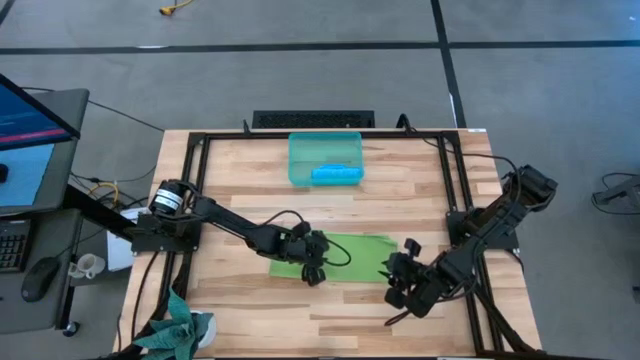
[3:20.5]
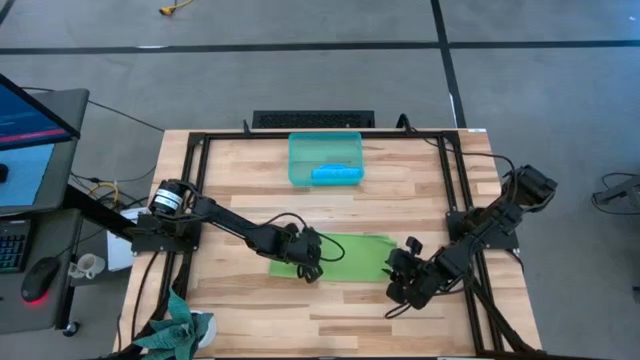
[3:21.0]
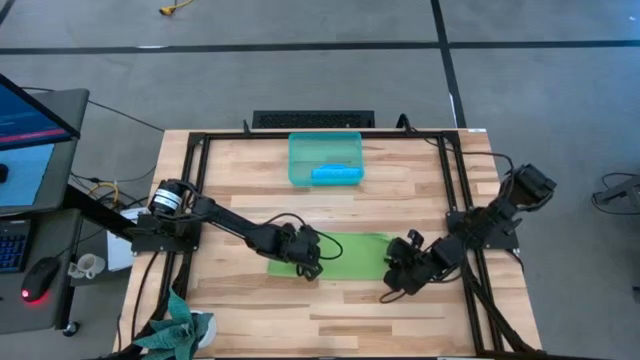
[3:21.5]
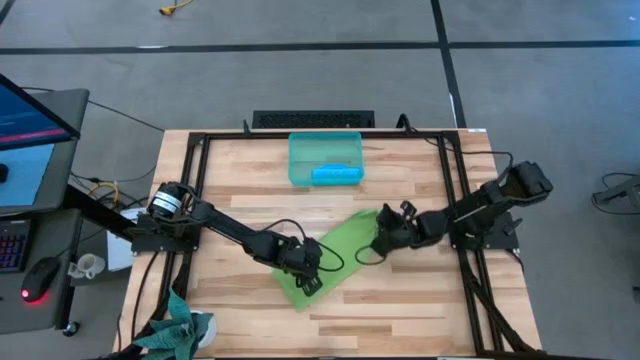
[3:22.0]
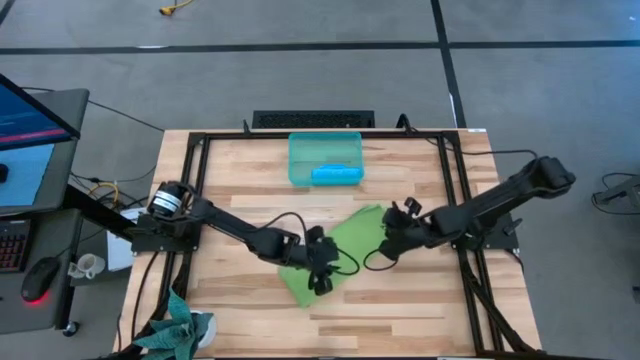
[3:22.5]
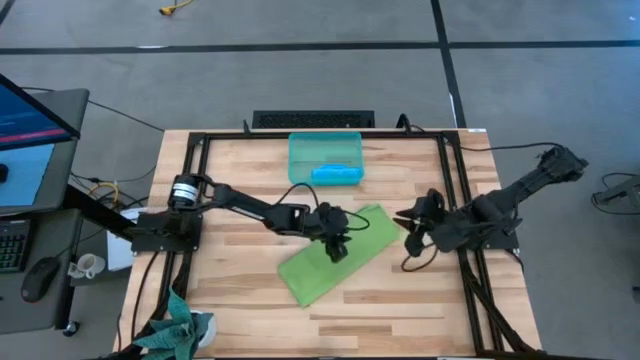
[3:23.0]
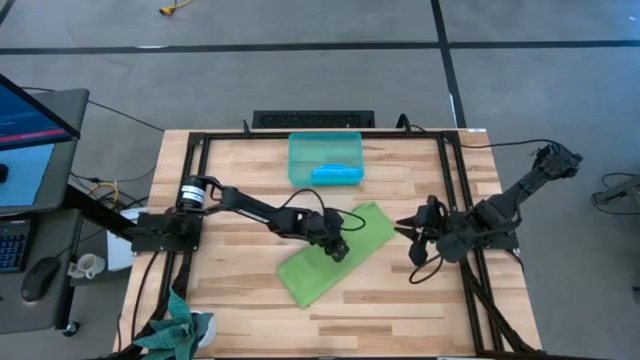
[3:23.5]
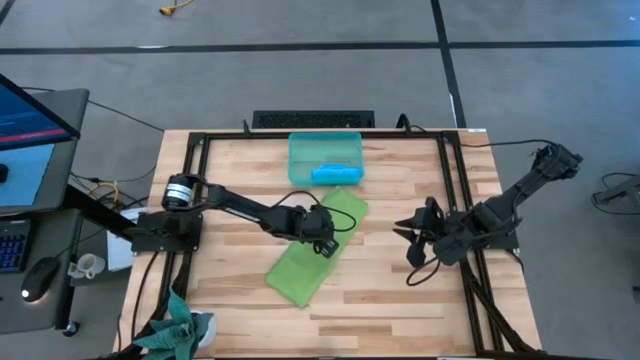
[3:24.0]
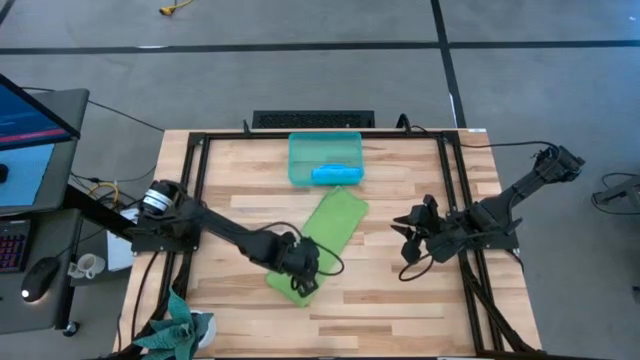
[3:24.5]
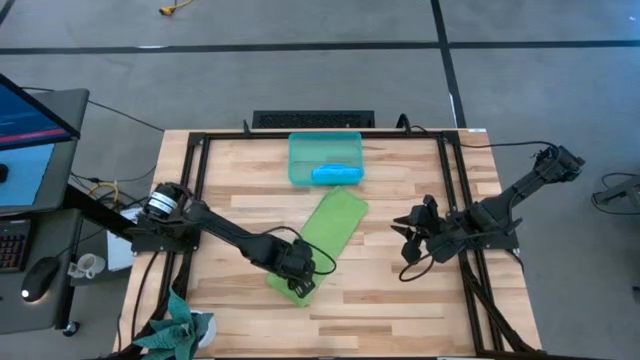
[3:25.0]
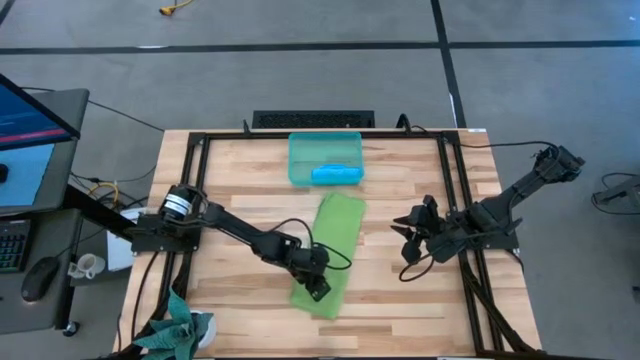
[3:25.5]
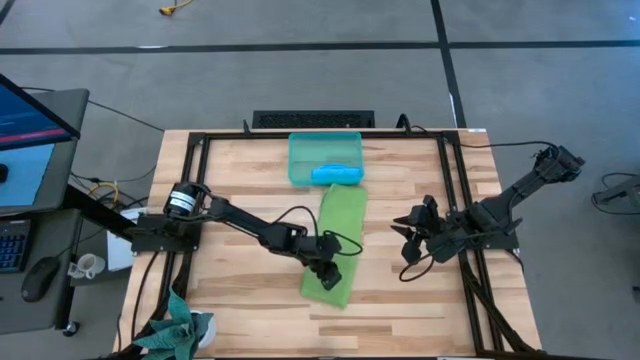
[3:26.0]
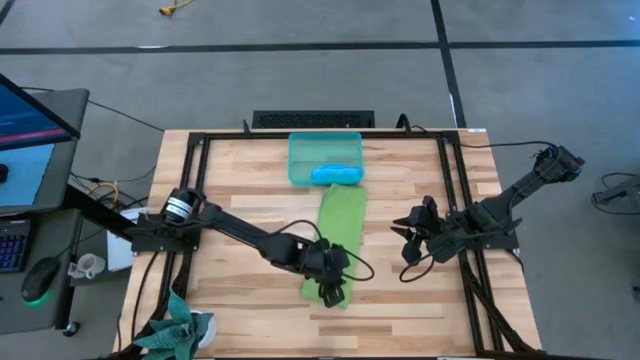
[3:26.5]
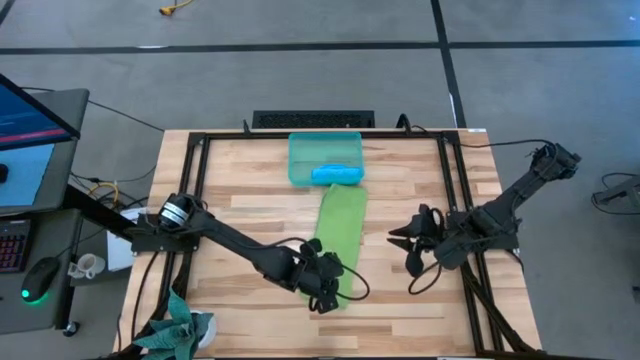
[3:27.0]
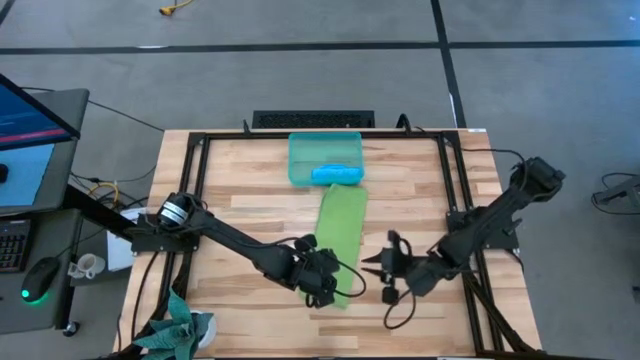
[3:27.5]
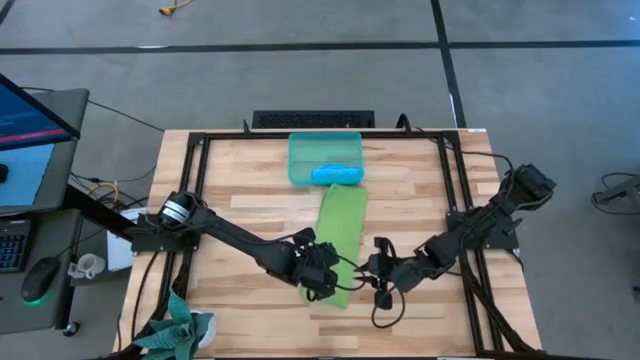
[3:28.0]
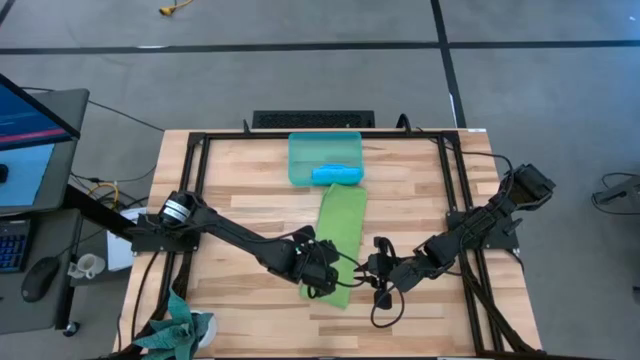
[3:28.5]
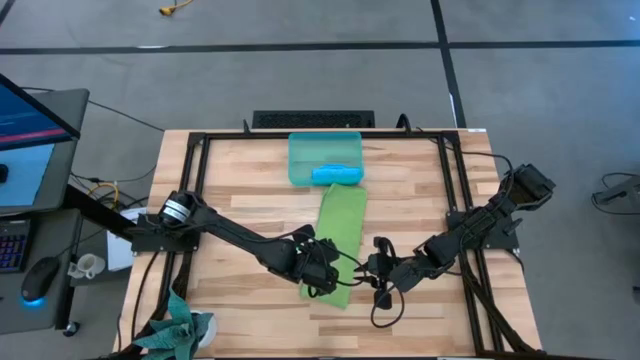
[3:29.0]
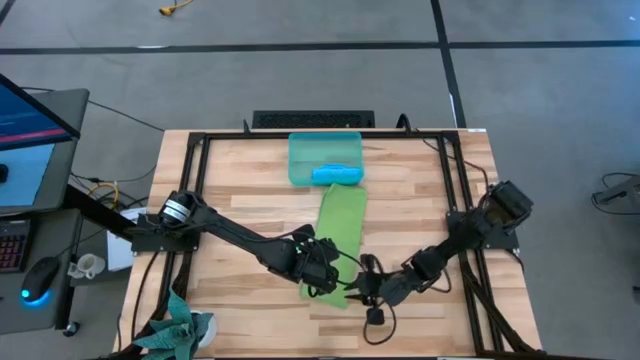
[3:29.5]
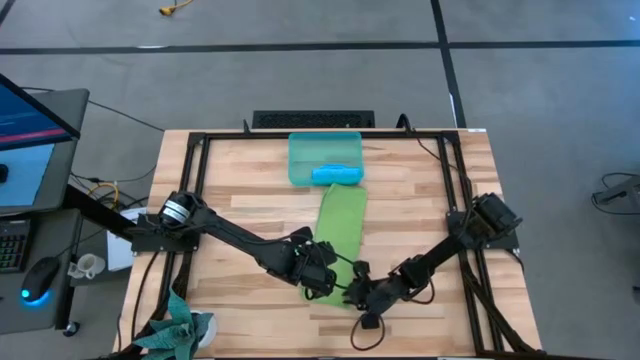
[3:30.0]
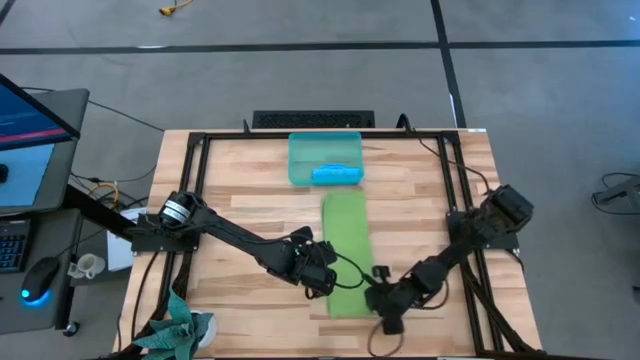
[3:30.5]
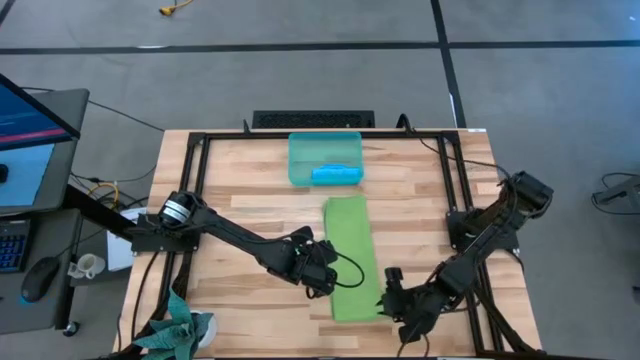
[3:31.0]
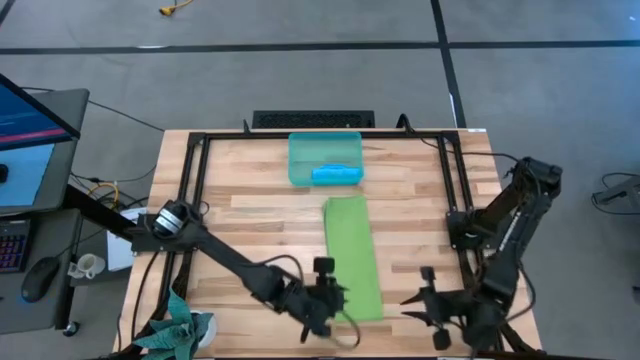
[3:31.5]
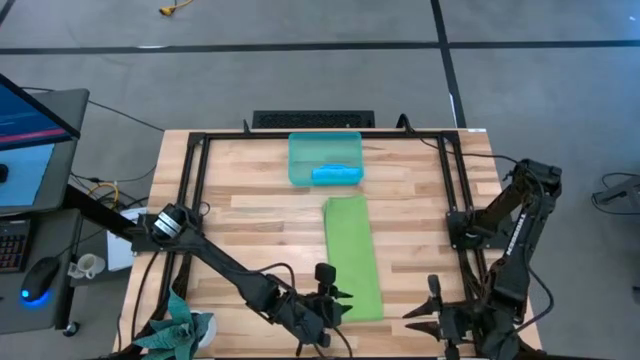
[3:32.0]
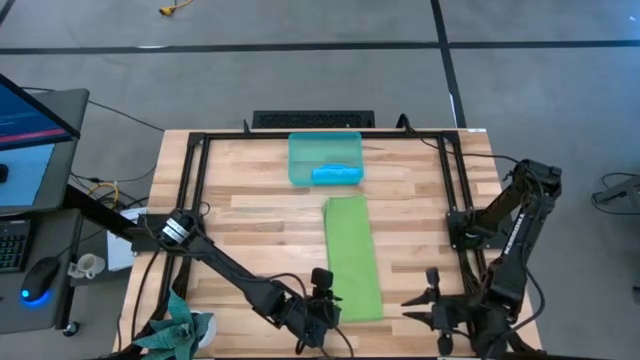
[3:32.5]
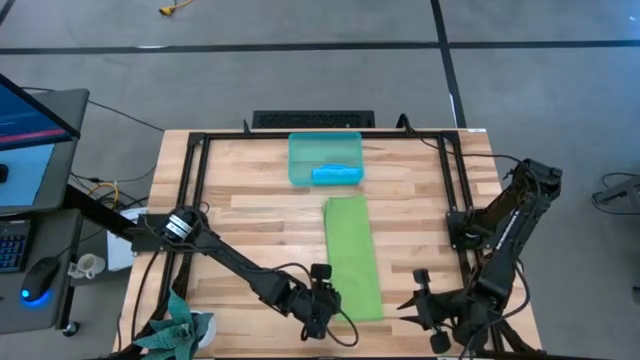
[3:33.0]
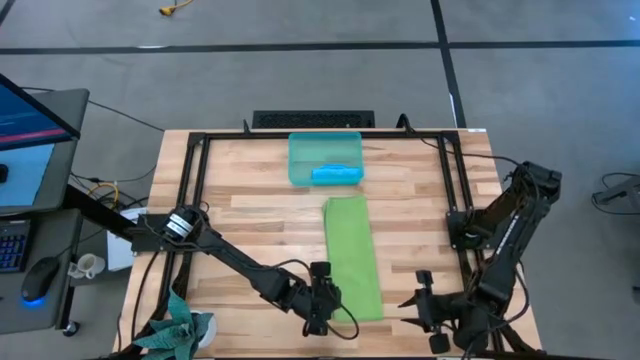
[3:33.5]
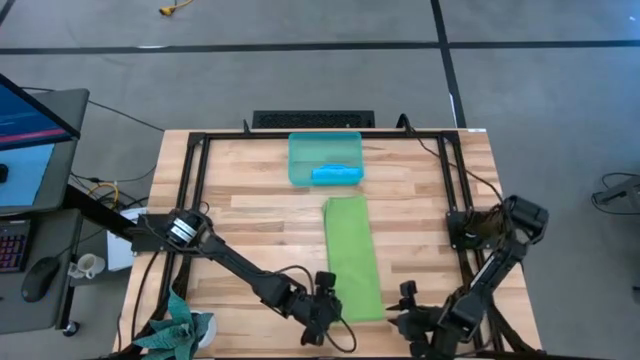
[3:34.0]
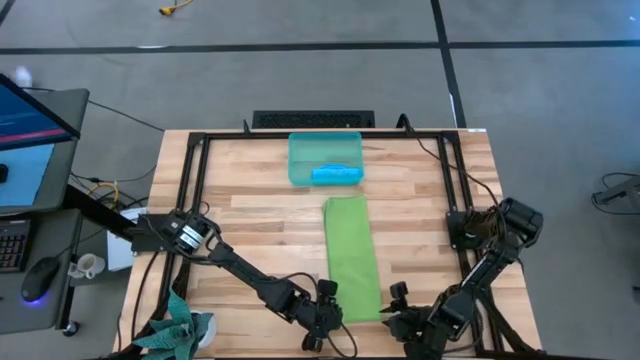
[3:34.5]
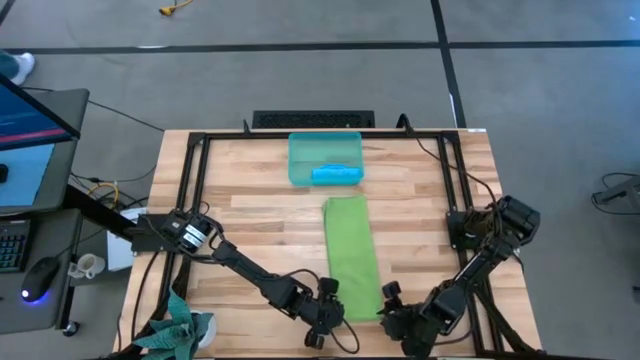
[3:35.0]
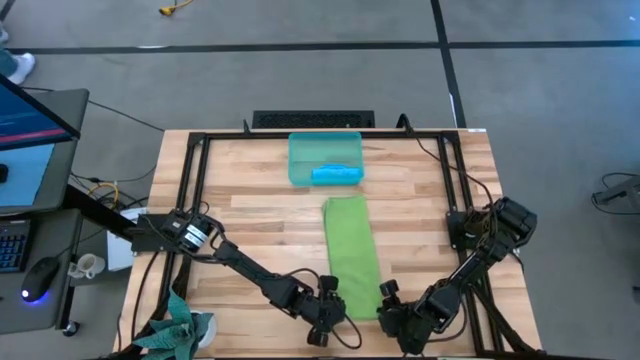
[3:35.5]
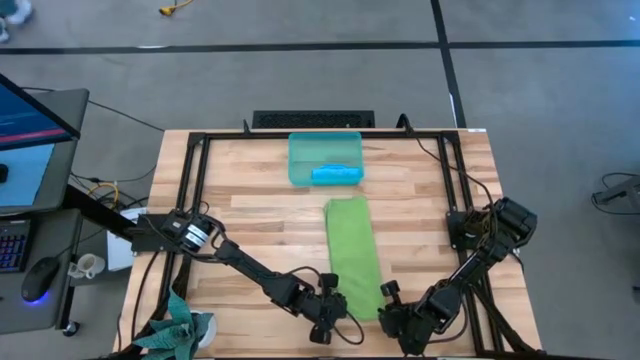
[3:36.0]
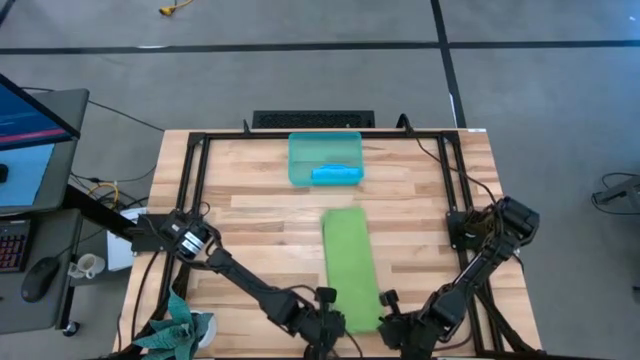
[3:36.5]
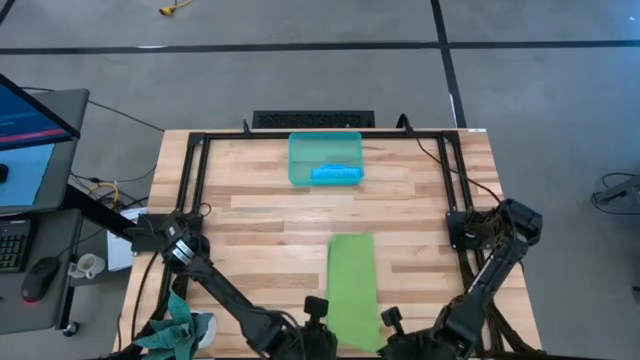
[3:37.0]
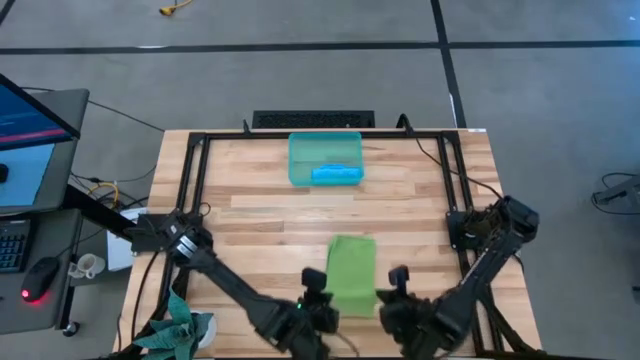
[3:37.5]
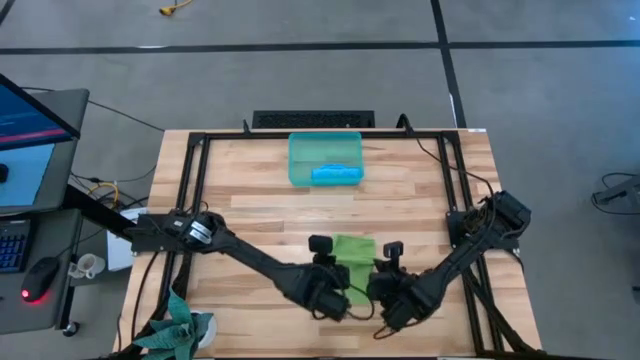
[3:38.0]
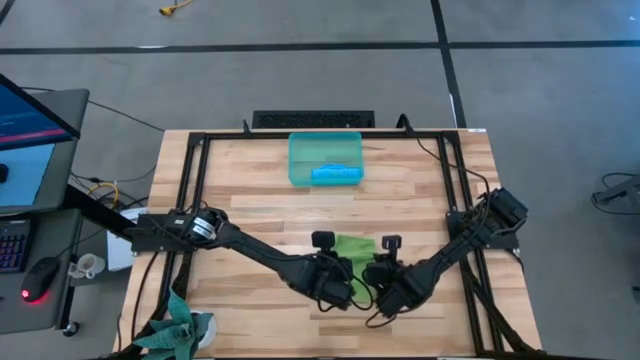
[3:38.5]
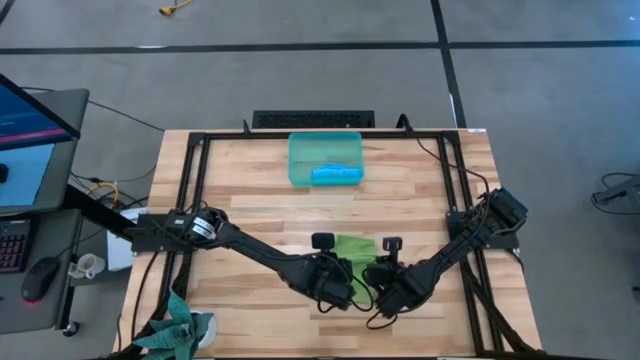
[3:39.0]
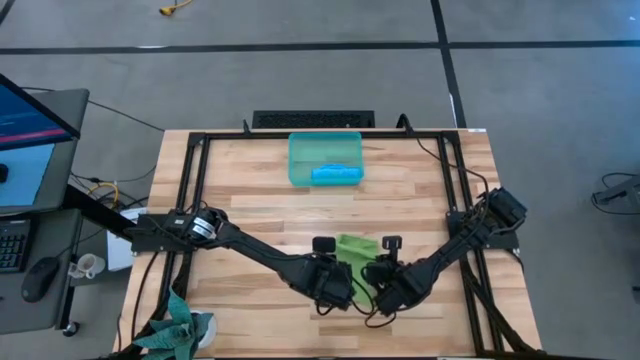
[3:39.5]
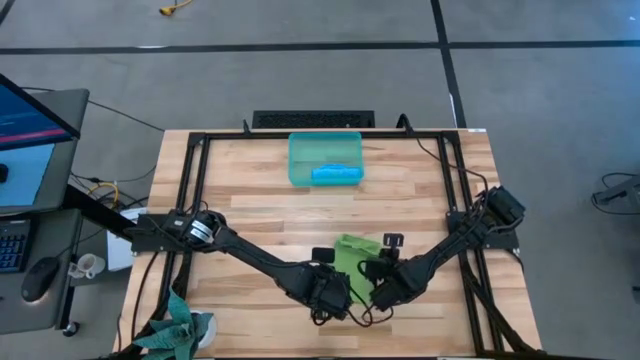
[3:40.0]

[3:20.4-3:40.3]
Task: Roll microfiber towels into tight, uniform cylinder then place into a basket
Fold the green microfiber cloth

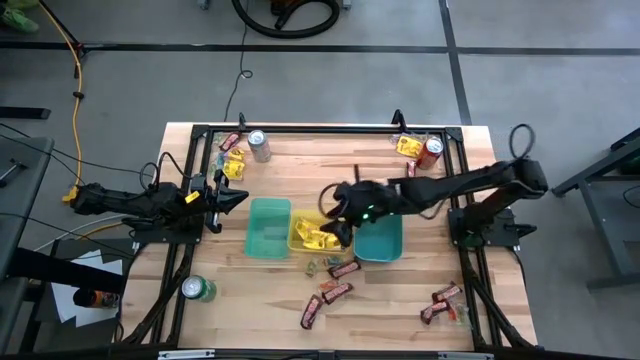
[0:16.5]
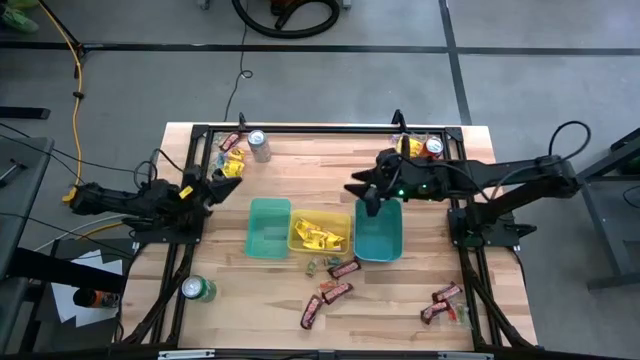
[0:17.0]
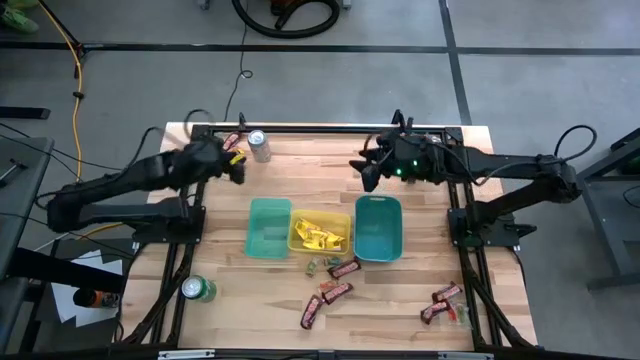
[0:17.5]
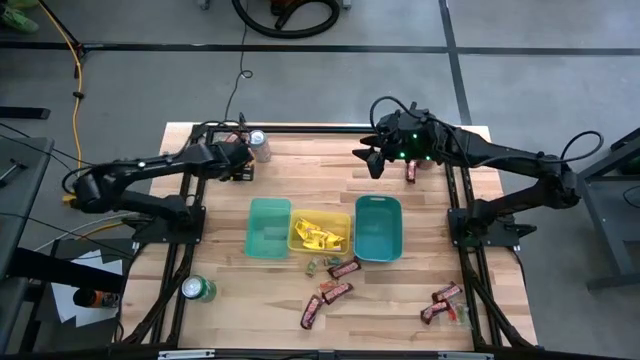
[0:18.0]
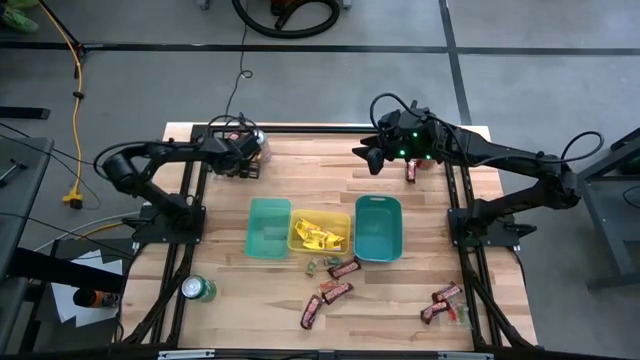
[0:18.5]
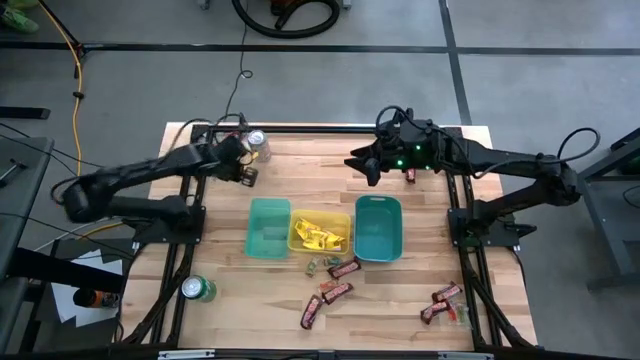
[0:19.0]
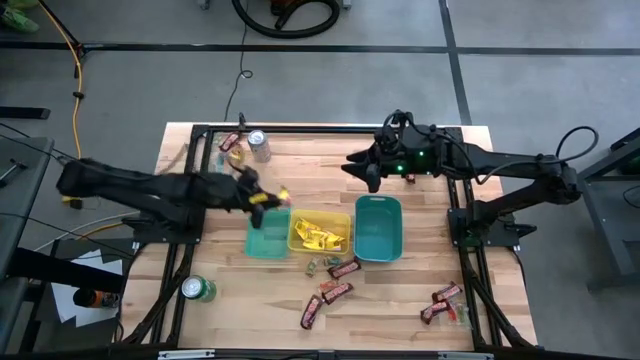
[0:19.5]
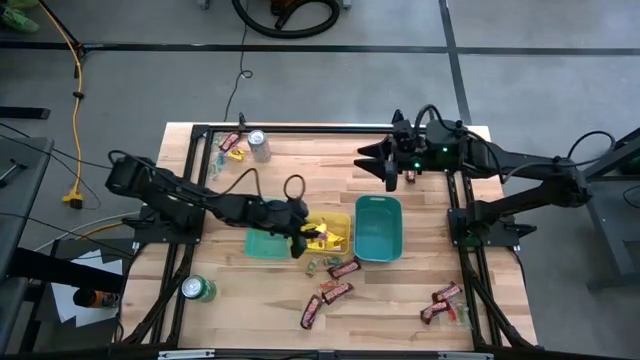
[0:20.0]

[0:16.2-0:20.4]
Task: Sort candy
Put the yellow candy into the yellow bin
